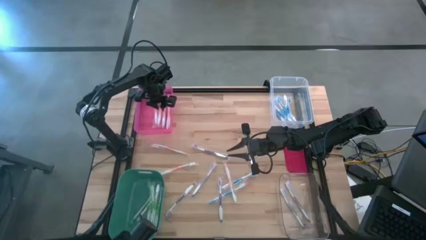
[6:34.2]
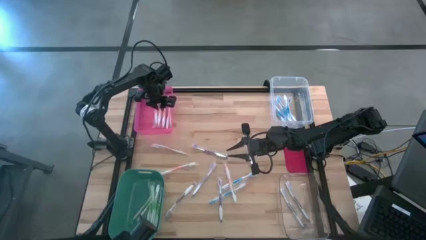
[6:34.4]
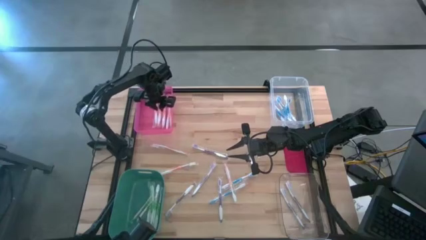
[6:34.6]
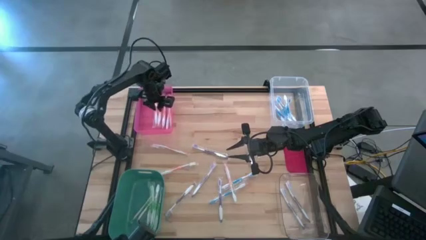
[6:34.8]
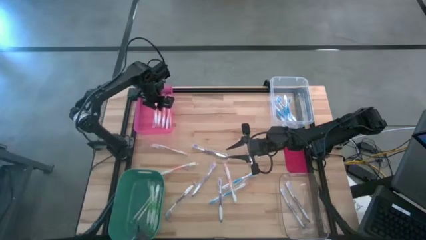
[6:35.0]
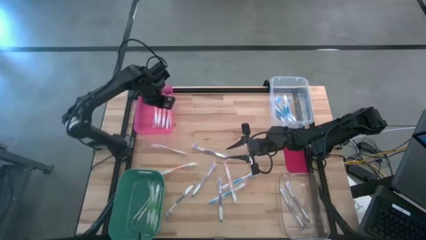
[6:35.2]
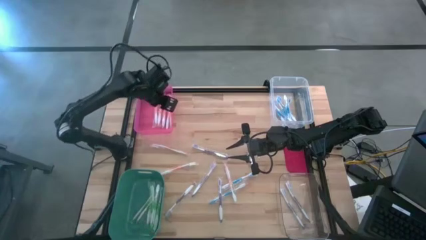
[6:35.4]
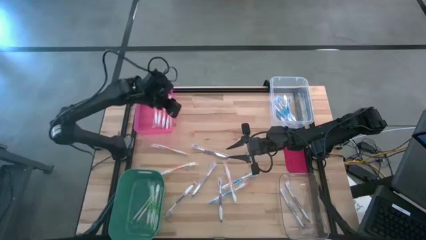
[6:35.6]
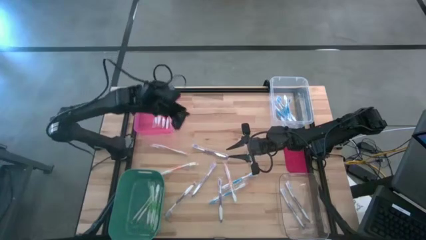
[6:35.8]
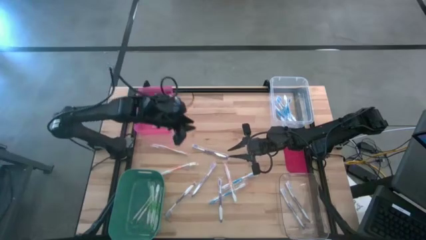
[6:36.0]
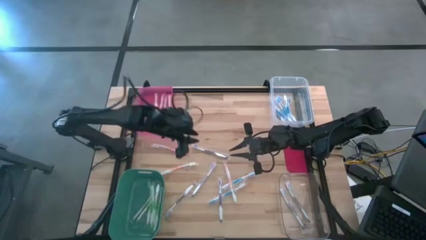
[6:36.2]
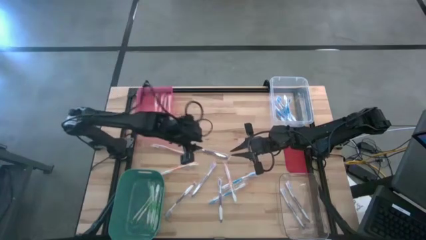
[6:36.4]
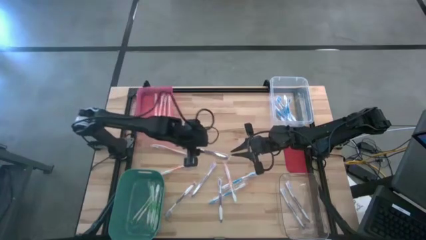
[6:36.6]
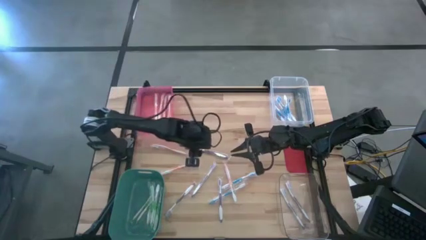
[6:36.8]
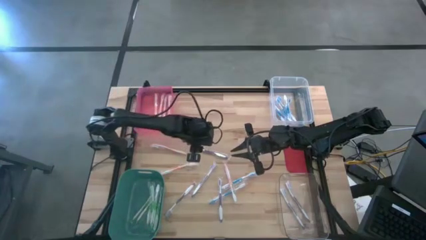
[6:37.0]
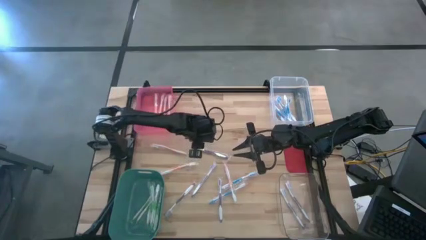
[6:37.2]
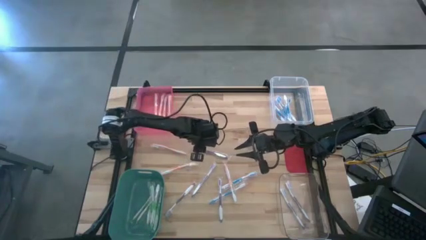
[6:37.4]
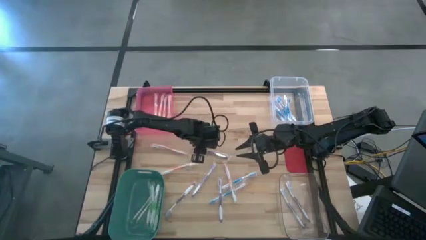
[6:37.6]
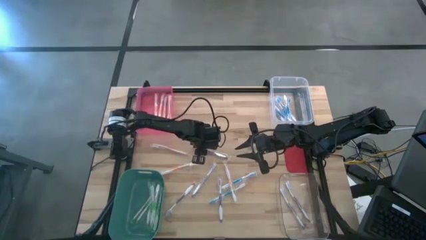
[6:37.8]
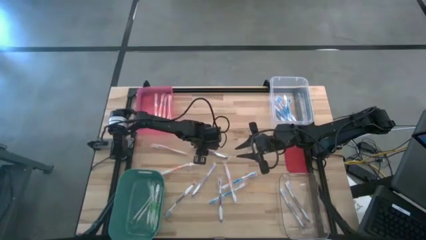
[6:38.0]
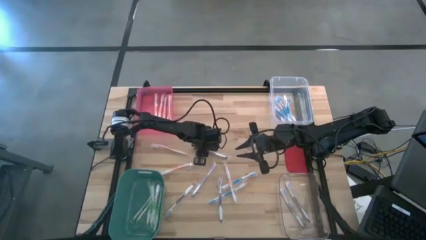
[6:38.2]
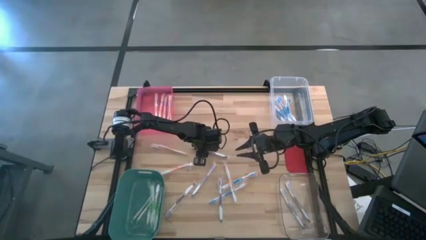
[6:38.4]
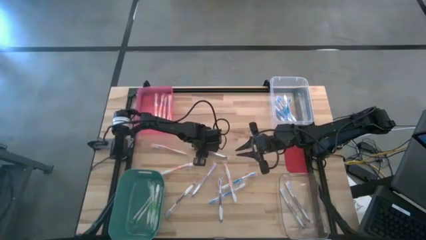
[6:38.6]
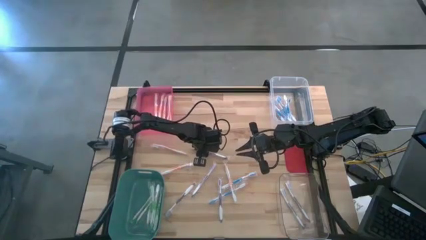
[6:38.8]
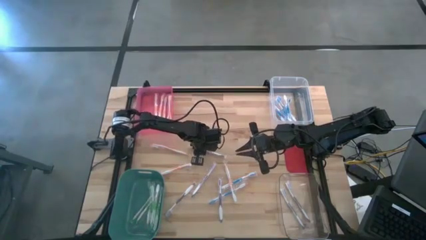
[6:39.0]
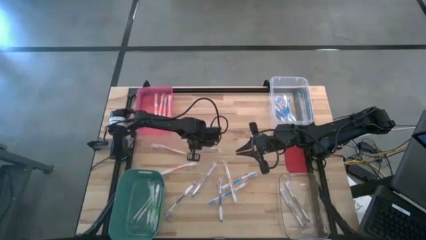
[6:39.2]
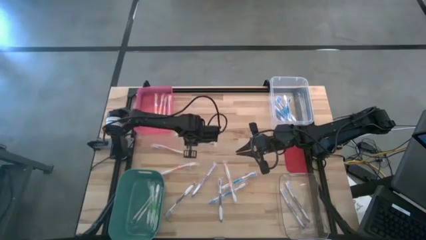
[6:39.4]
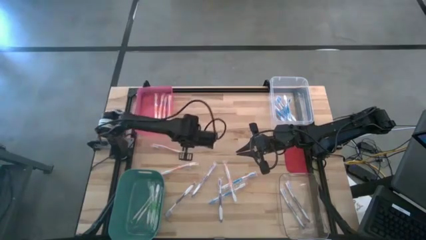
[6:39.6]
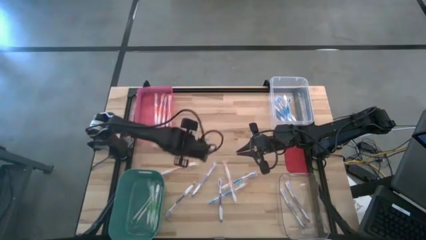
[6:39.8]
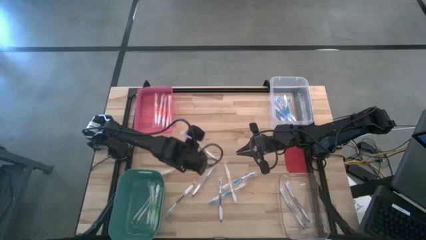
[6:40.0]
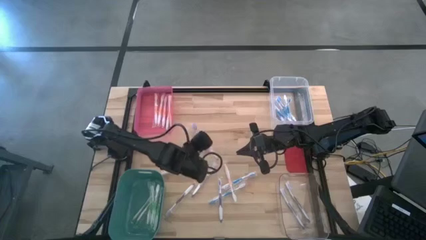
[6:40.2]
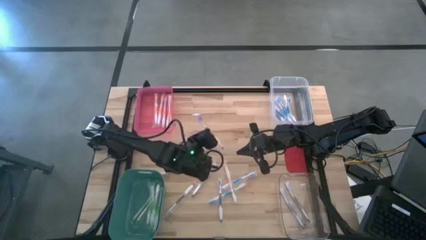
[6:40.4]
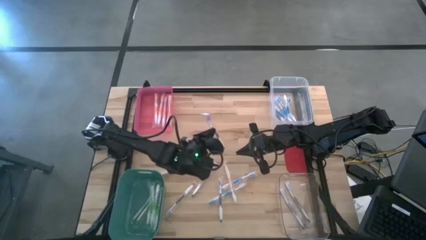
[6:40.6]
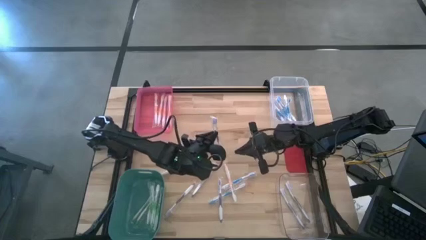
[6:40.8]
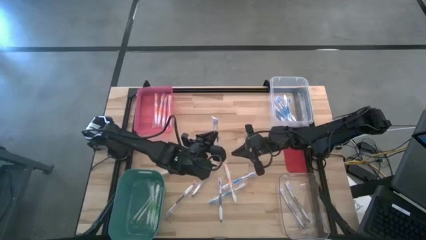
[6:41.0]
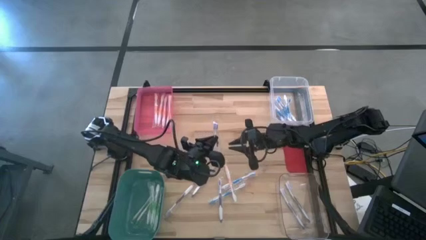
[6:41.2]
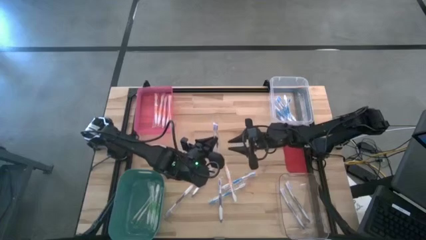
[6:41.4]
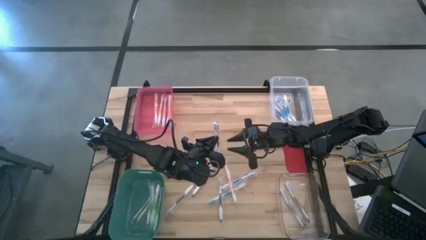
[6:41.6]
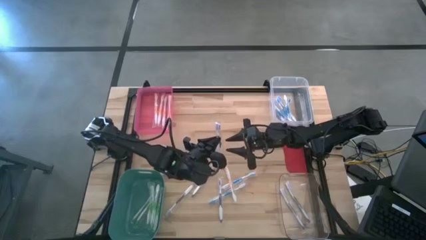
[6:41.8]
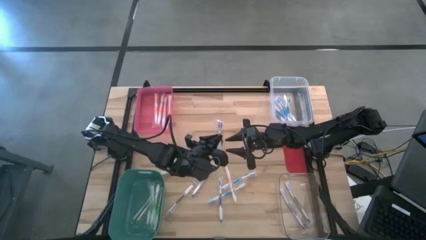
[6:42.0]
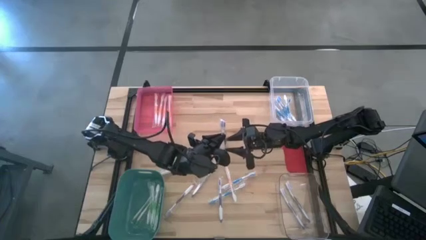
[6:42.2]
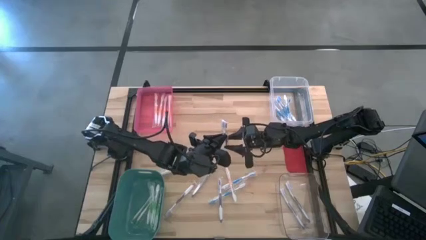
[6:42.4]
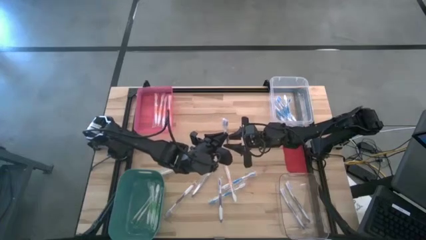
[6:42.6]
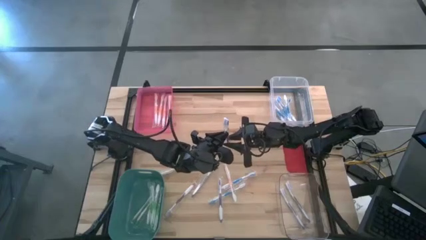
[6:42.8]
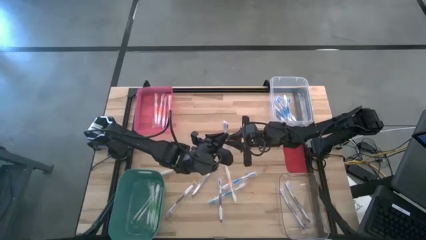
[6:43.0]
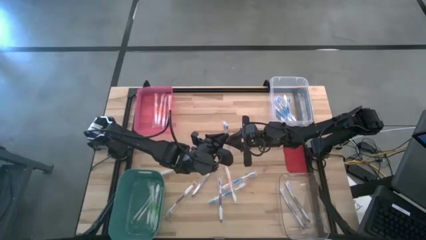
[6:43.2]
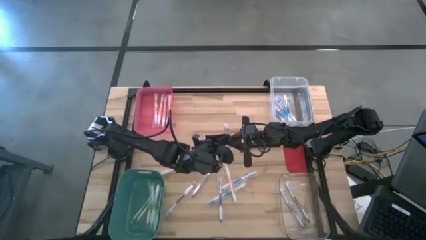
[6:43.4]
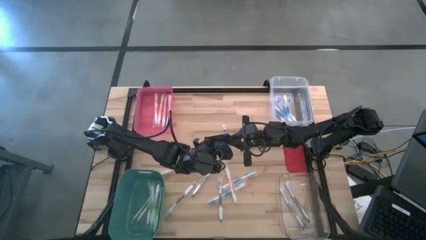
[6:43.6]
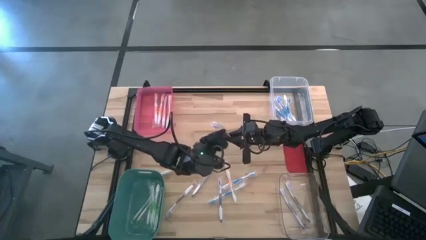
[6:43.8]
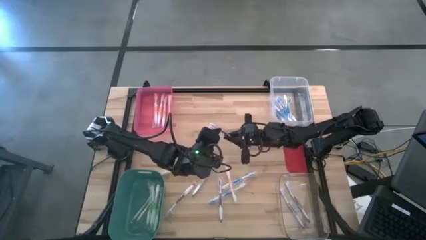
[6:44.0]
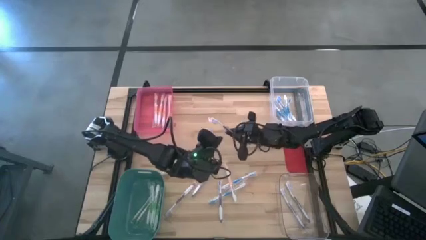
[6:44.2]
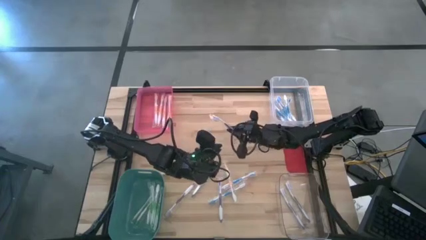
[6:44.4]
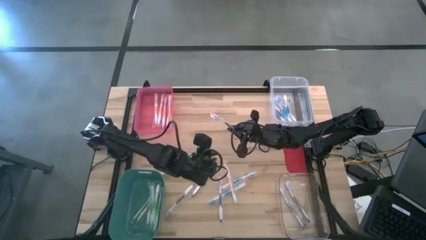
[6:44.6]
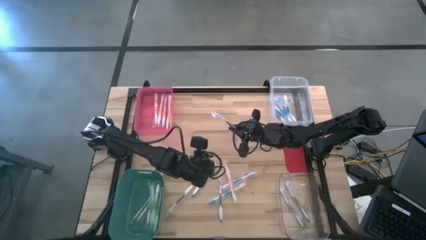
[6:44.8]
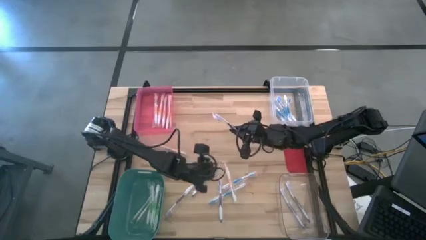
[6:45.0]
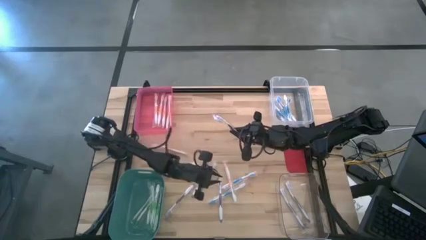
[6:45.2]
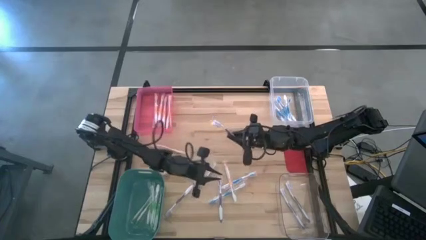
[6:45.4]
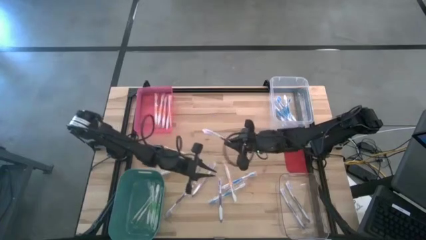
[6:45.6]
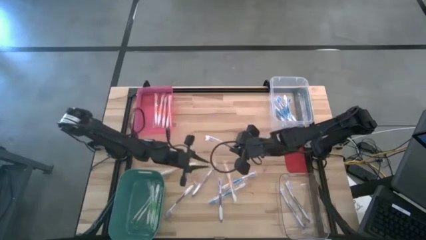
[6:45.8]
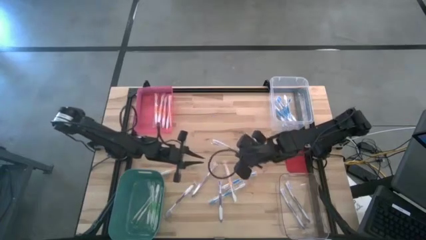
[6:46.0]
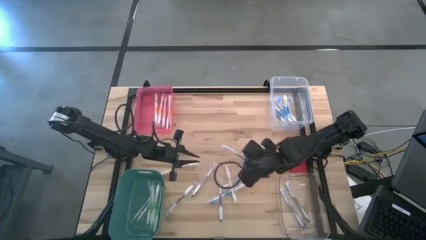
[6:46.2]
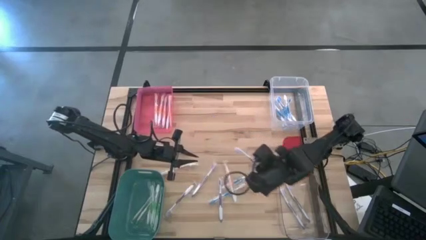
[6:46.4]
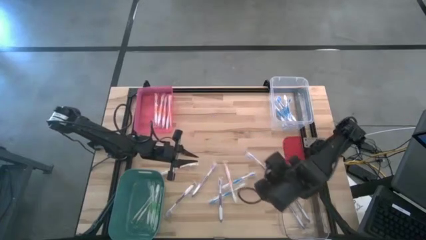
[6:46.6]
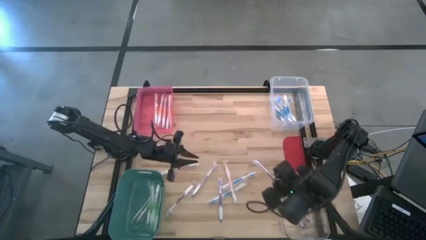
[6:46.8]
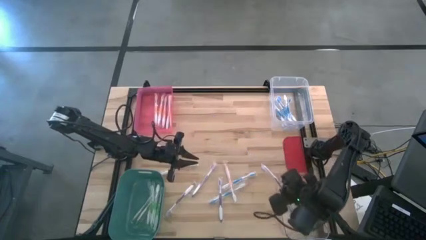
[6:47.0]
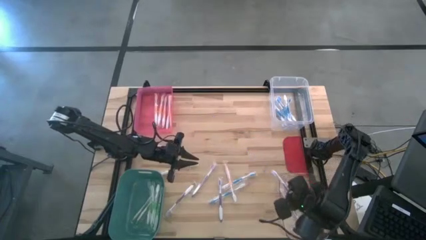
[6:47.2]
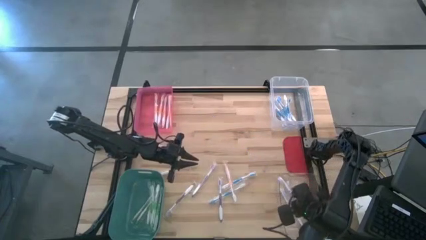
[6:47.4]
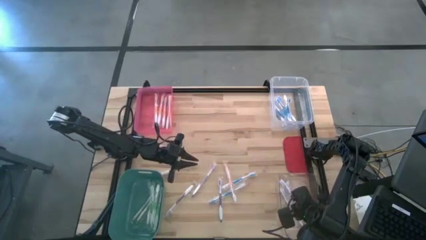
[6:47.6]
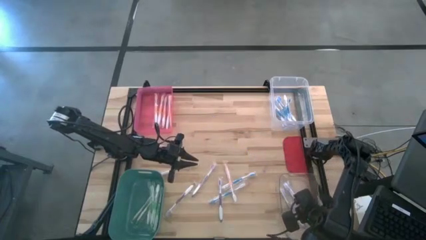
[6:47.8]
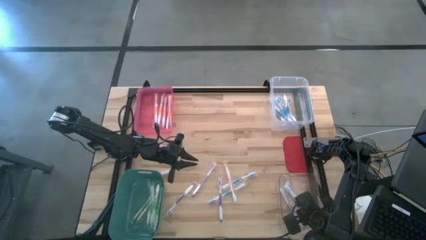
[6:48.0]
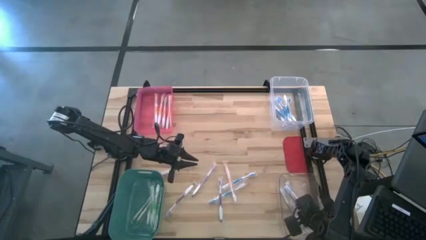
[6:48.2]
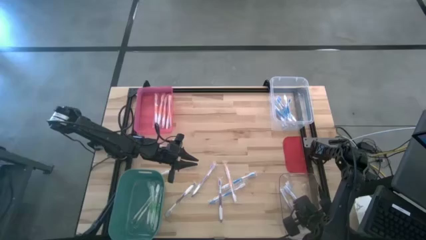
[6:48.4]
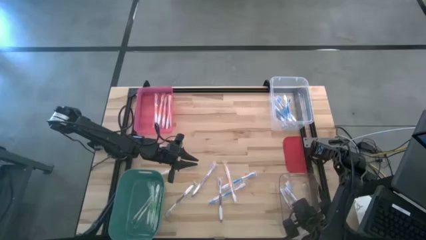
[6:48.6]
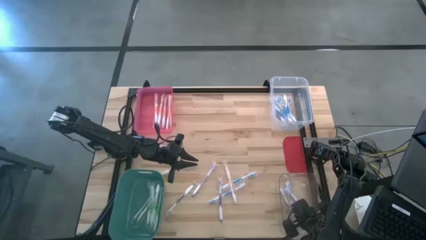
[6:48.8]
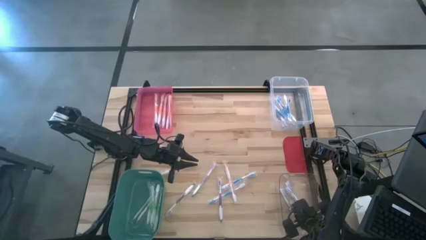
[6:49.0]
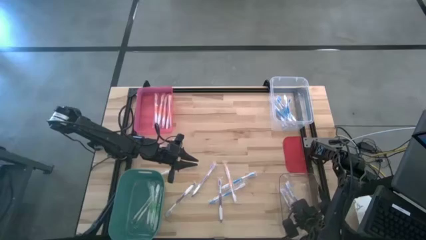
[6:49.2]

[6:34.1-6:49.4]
Task: Pick & Place Toothbrushes
Put the violet toothbrush into the bottom transparent bin

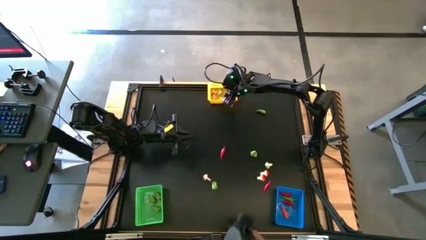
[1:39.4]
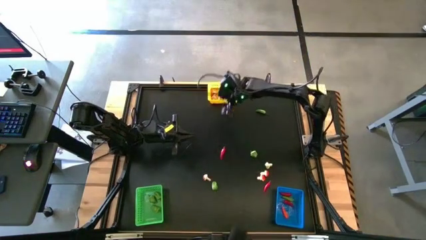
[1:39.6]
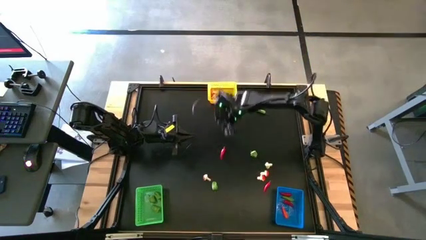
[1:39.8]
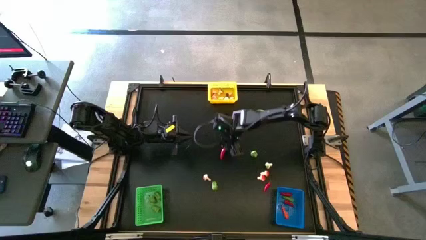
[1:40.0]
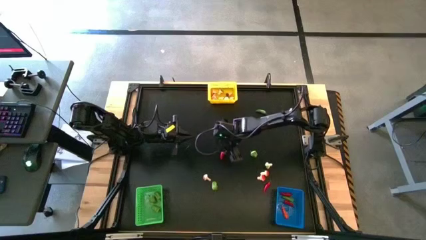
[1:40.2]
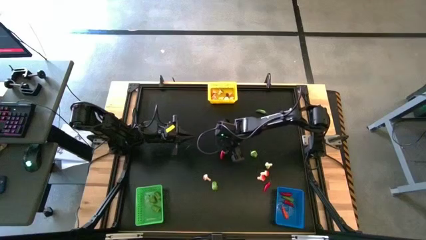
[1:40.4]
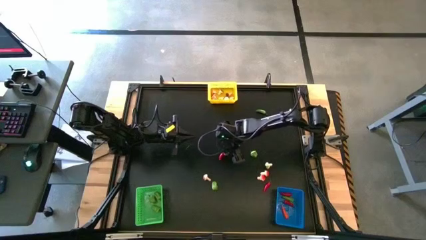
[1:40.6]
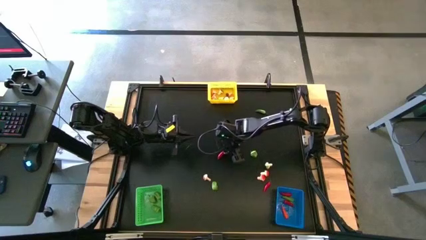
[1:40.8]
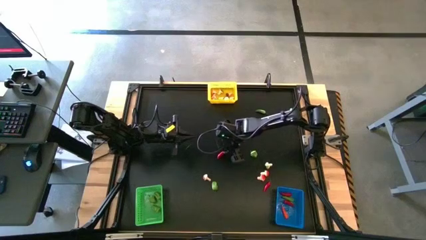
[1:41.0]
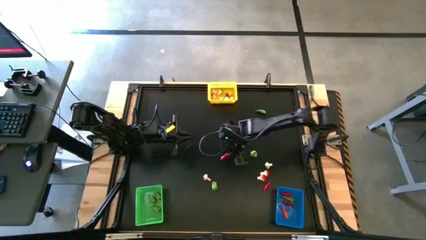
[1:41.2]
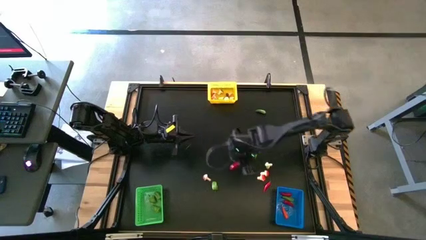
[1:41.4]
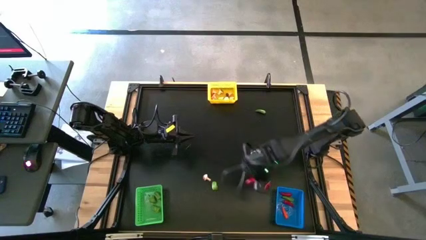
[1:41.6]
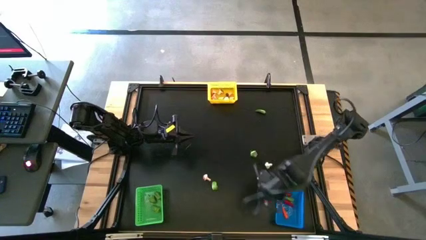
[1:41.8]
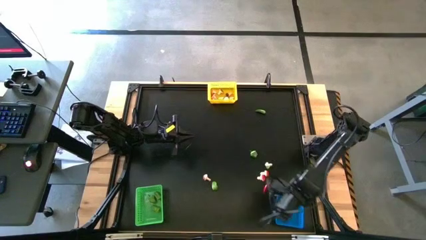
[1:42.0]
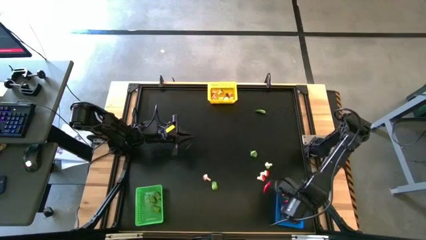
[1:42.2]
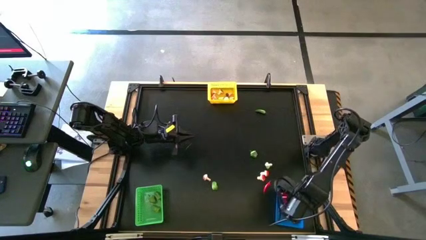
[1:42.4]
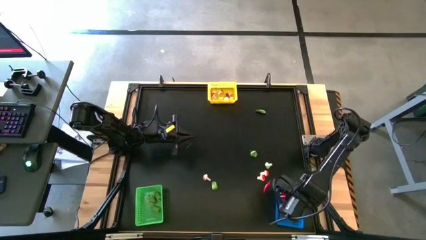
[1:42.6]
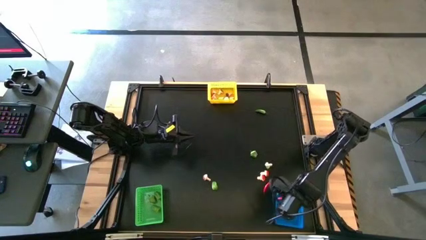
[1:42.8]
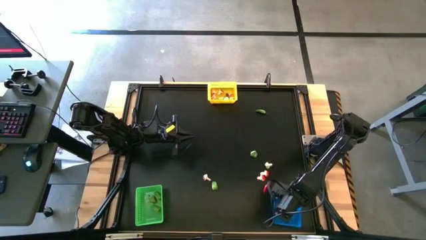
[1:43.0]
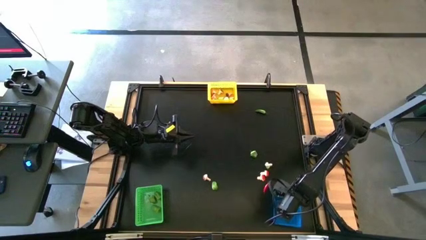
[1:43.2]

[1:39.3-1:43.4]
Task: Sort produce into baskets
Put the middle left red chili into the blue bin
